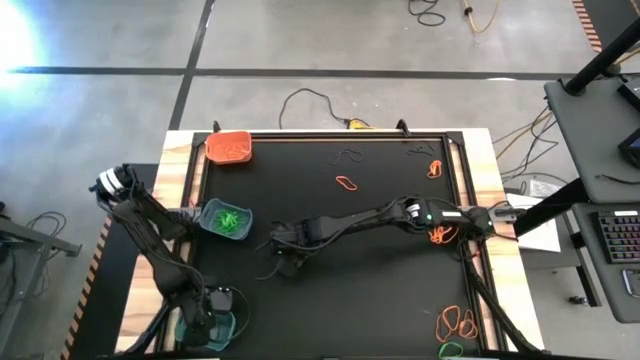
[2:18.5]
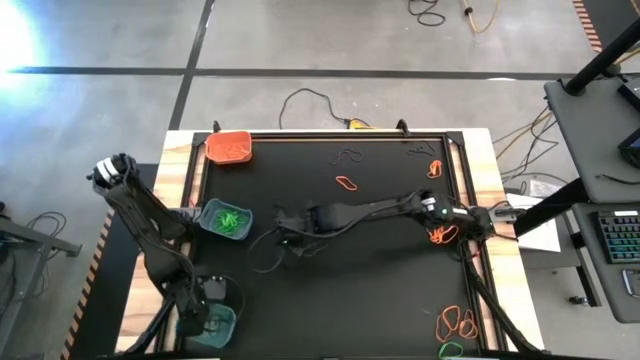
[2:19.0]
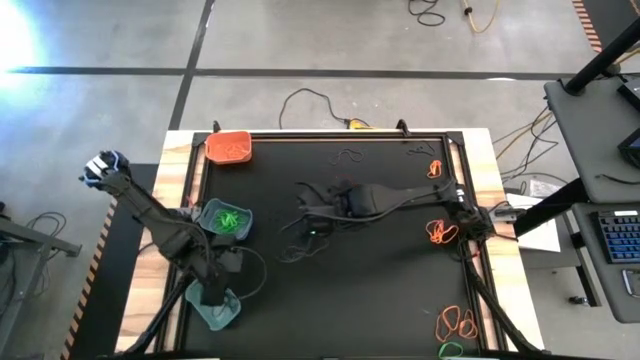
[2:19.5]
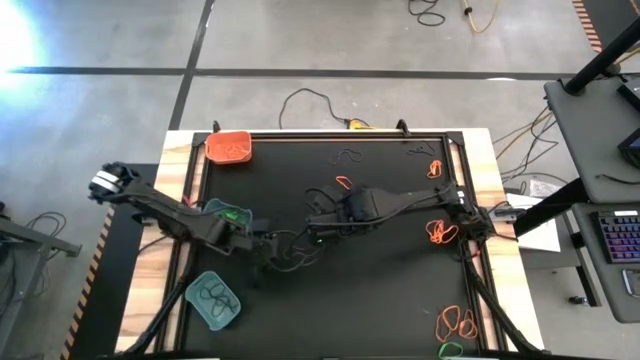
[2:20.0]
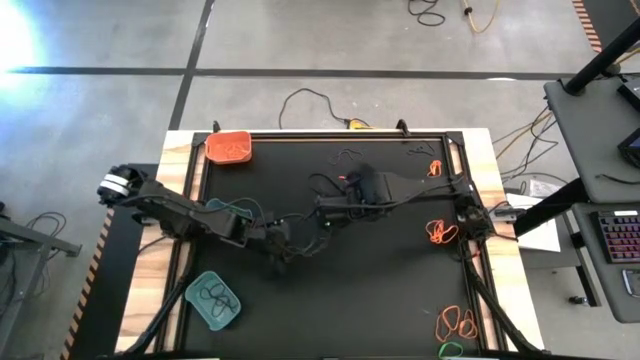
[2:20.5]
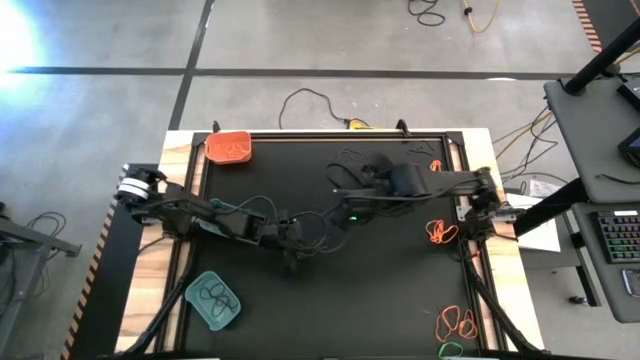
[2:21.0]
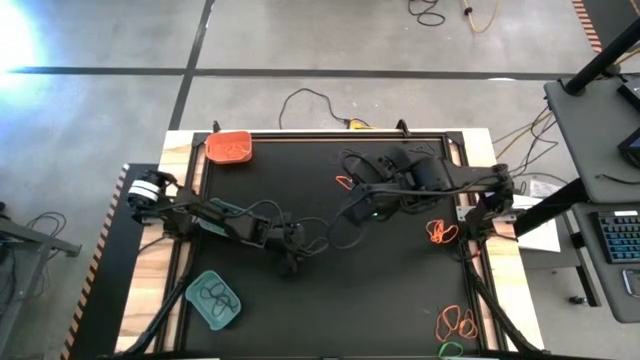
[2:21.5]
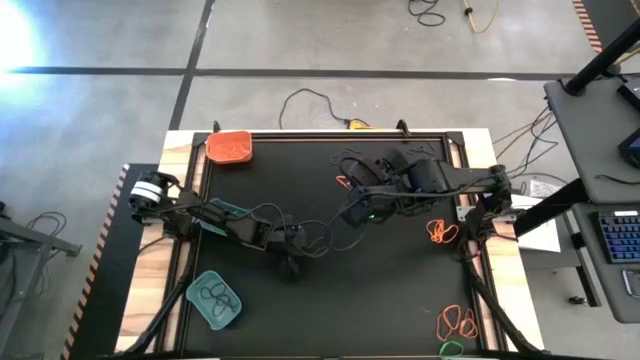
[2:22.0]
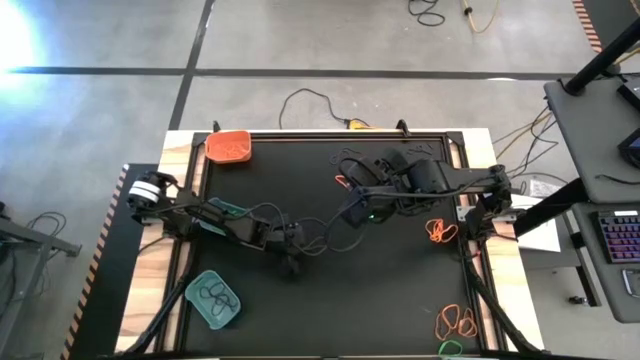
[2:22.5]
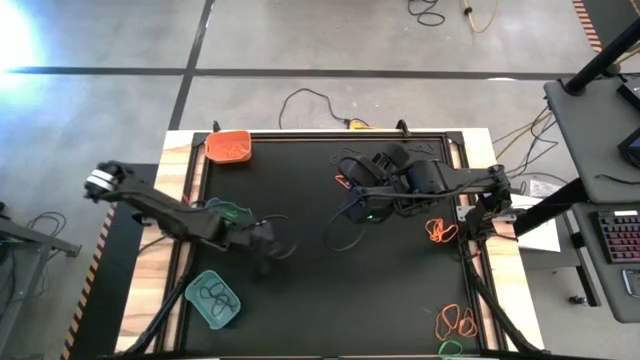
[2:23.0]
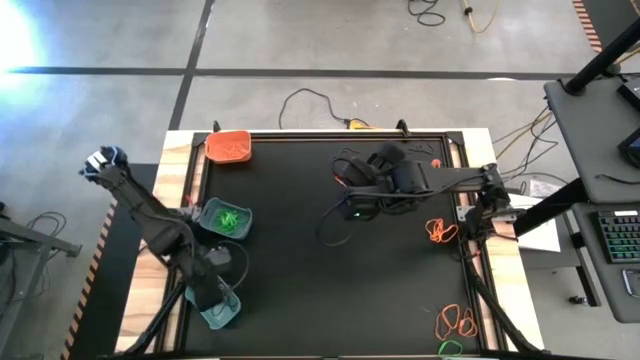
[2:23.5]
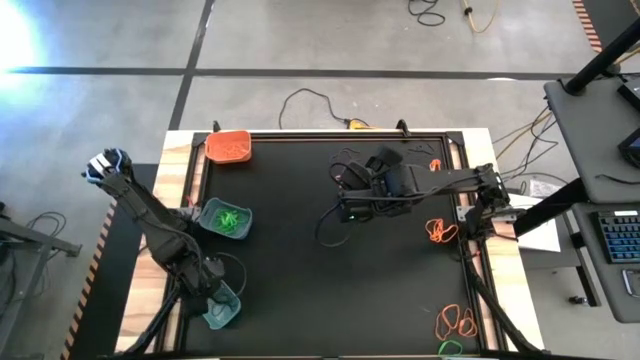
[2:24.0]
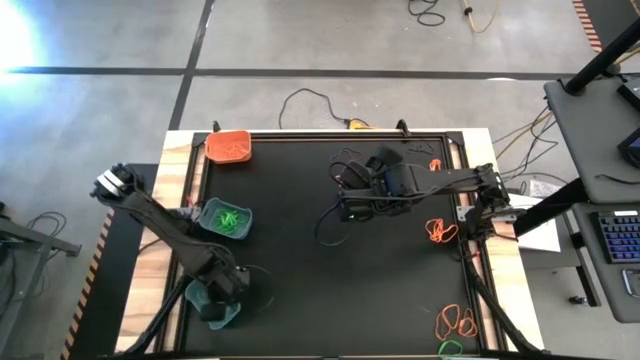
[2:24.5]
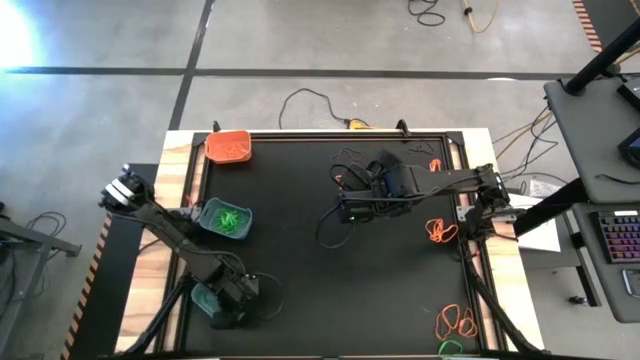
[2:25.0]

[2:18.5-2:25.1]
Task: Sort rubber bands into baskets
Put the purple rubber band into the green bin

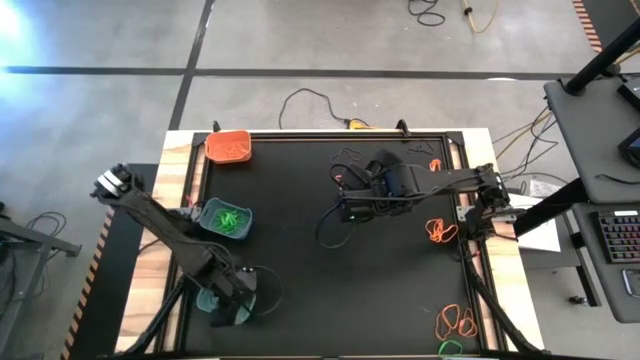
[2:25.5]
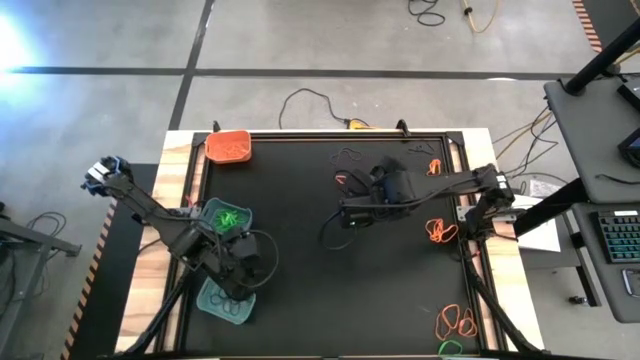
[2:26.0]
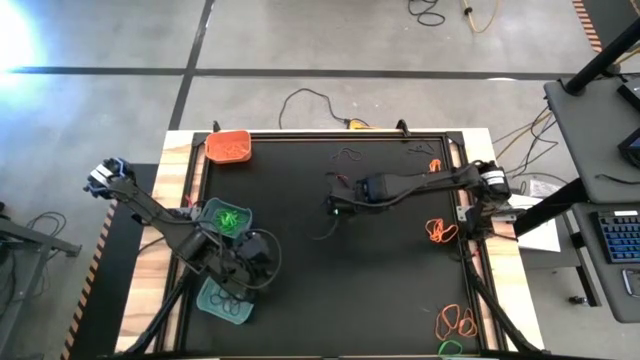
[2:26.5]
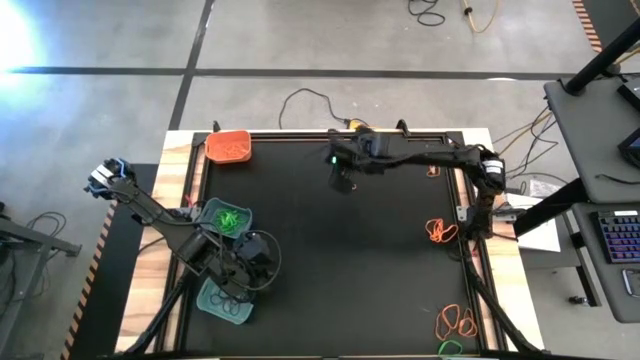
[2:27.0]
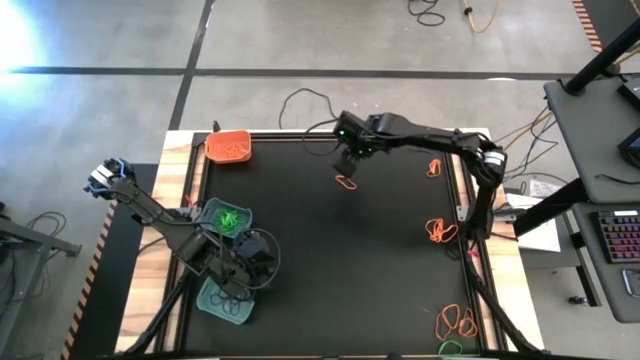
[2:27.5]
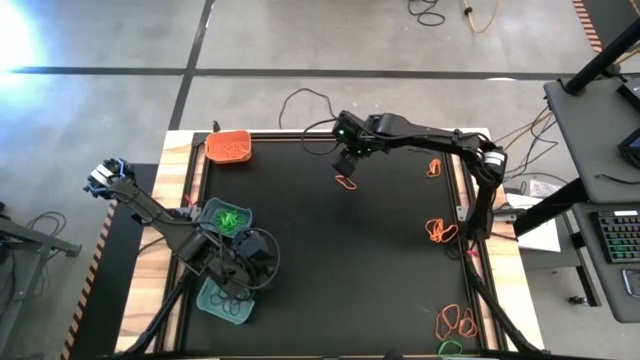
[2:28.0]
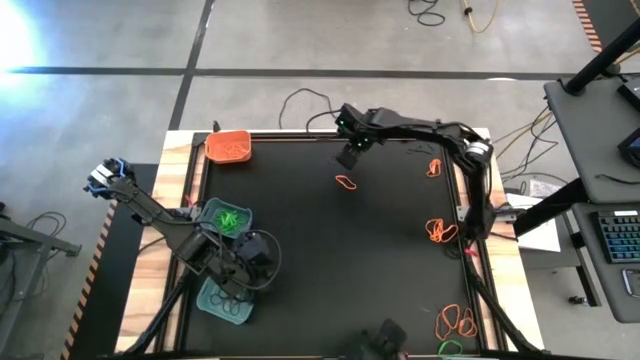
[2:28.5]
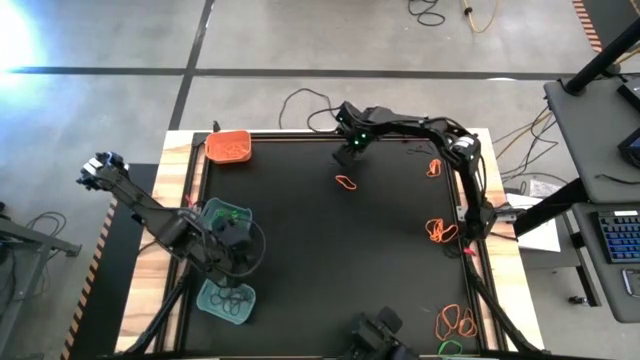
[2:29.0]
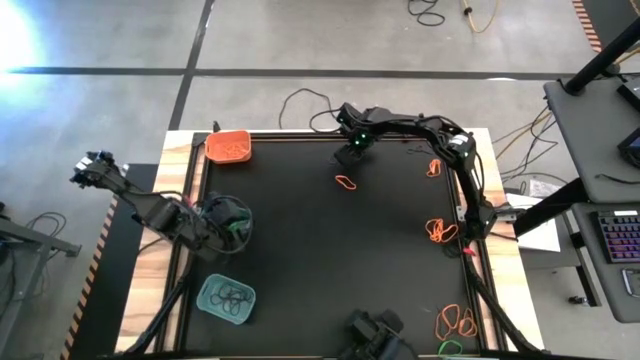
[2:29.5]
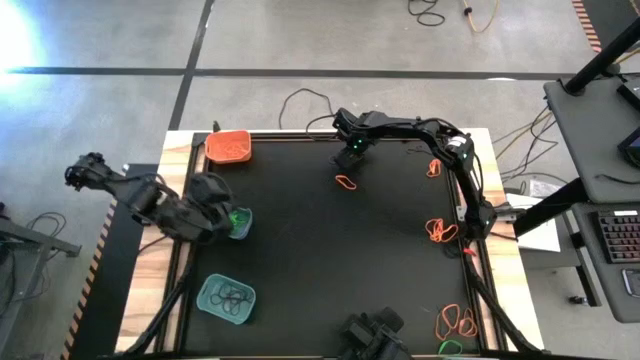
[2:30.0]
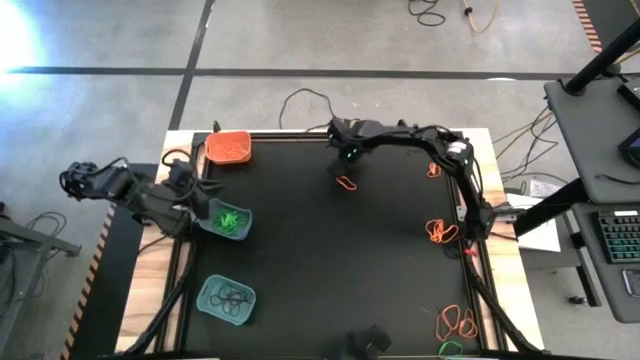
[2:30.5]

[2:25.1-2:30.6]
Put the purple rubber band into the green bin

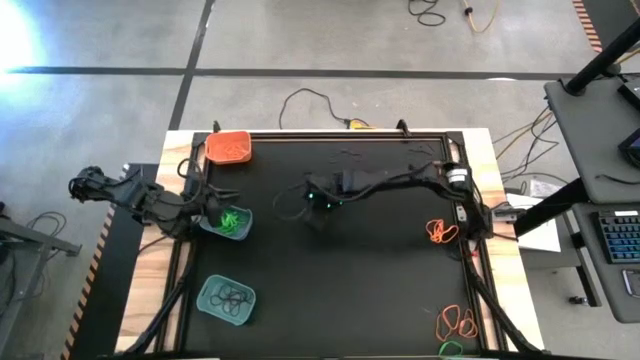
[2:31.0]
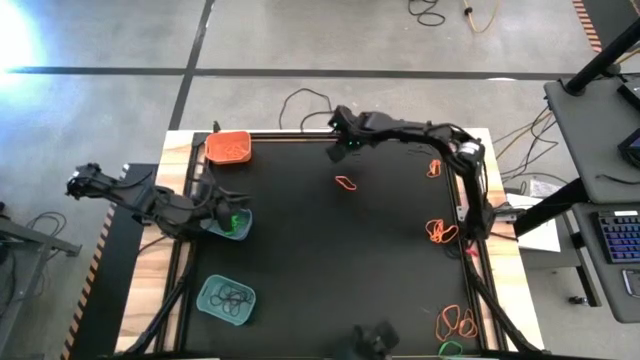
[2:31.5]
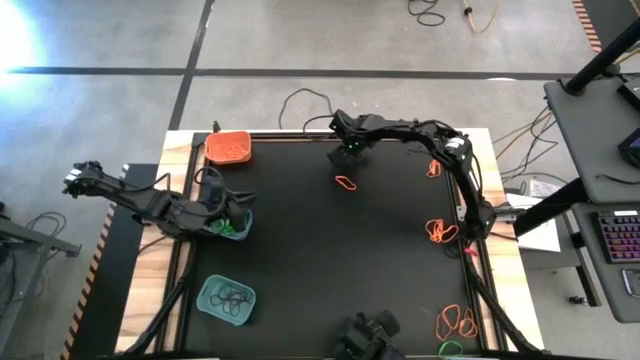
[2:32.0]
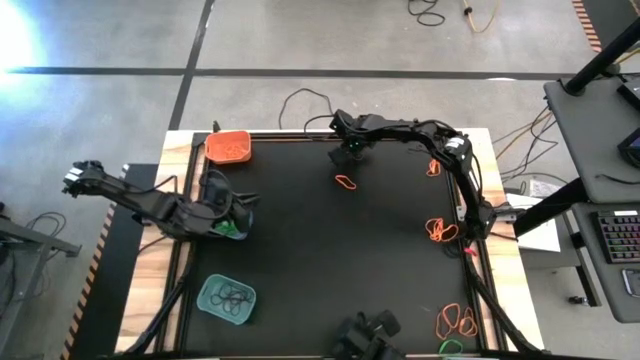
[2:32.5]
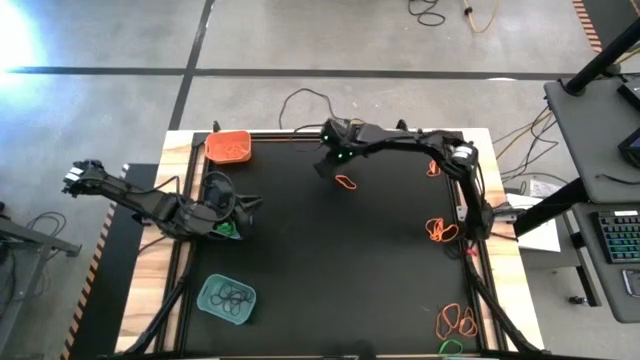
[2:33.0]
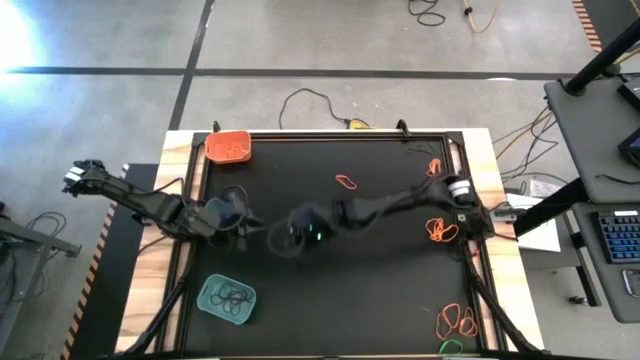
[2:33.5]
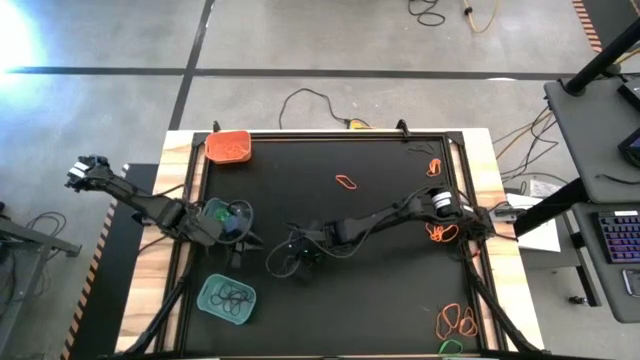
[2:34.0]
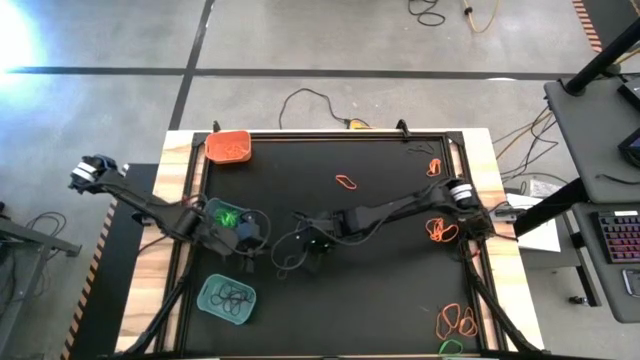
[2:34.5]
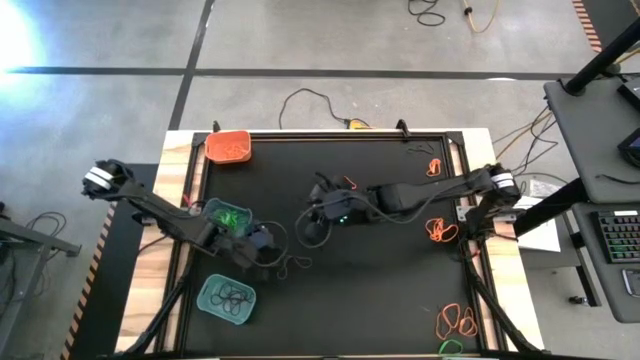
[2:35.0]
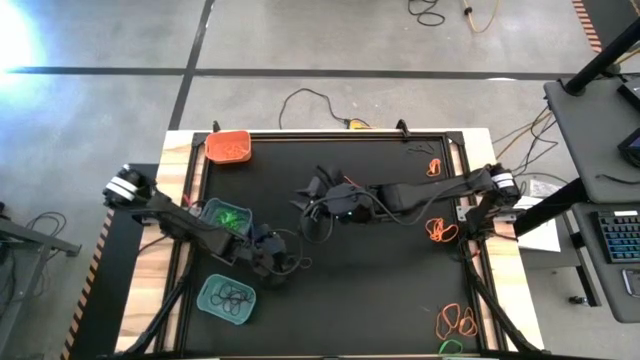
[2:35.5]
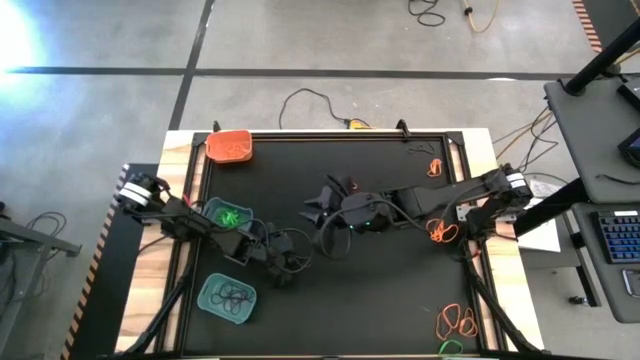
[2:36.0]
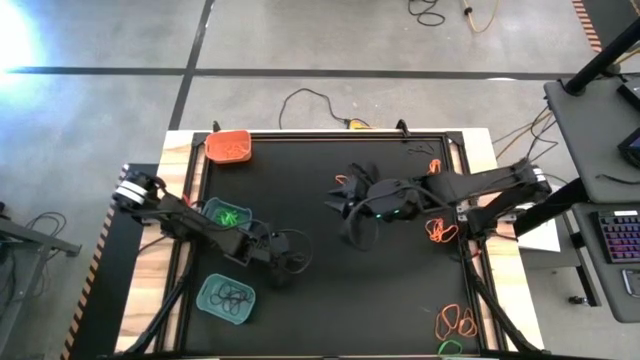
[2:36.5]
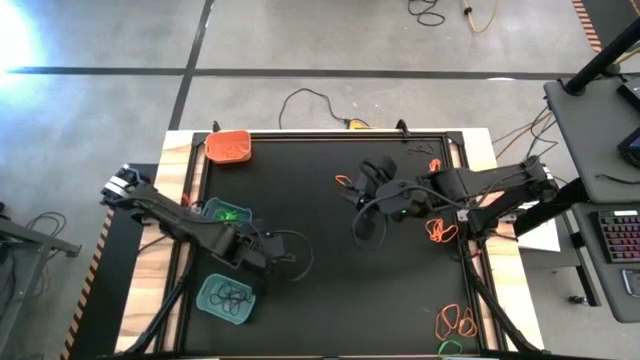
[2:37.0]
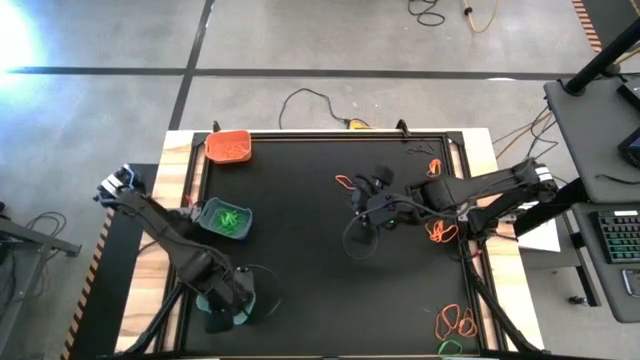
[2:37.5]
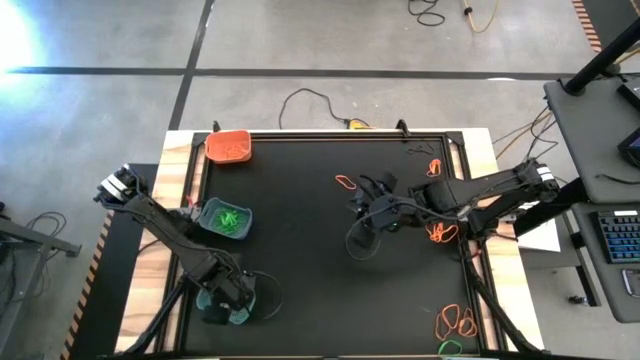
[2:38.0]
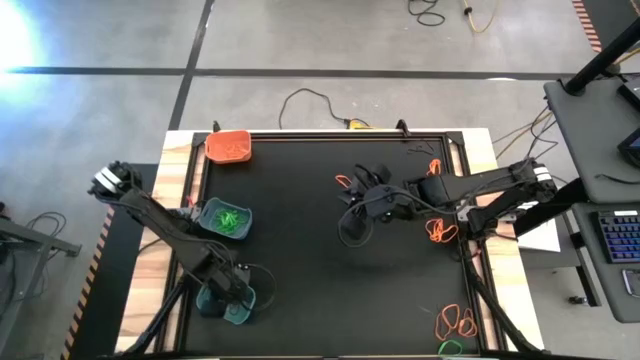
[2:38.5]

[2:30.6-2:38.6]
Put the purple rubber band into the green bin
